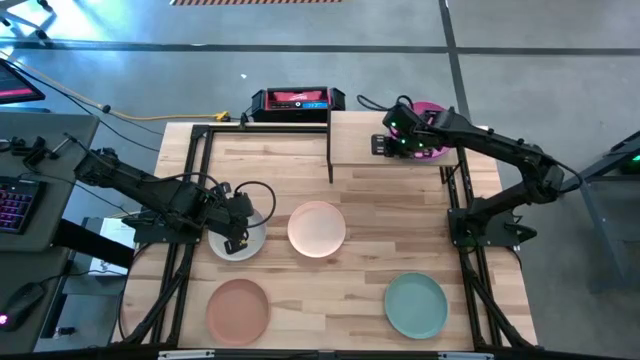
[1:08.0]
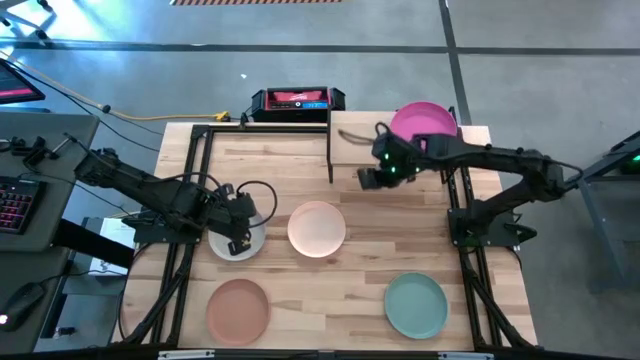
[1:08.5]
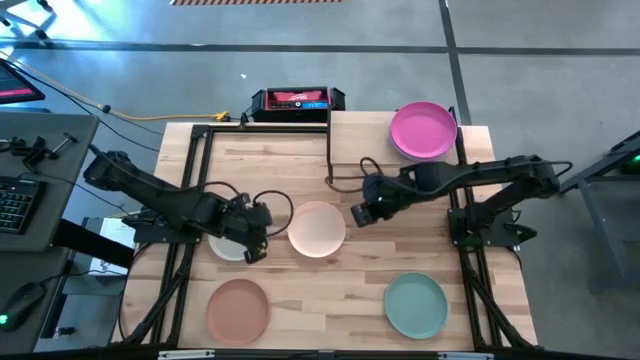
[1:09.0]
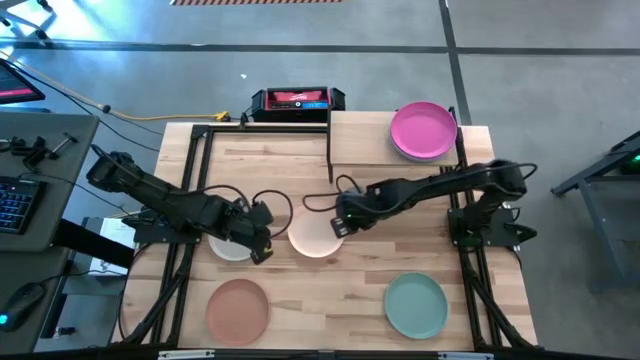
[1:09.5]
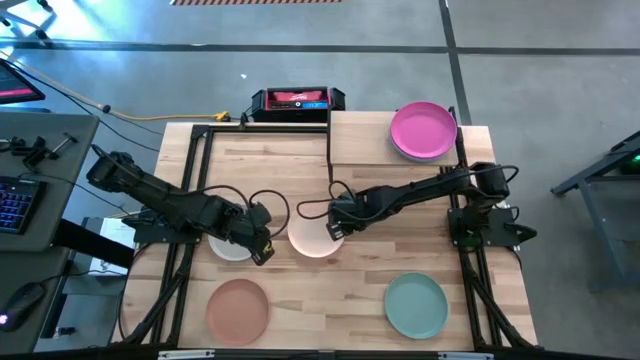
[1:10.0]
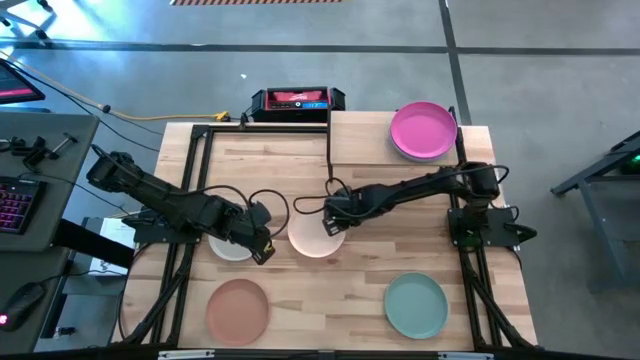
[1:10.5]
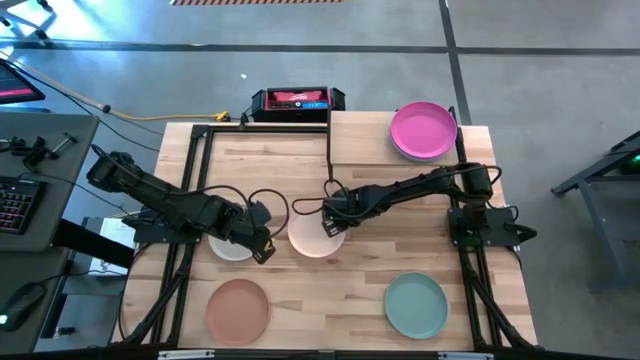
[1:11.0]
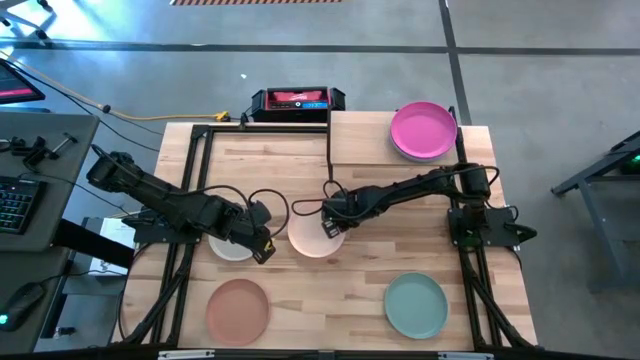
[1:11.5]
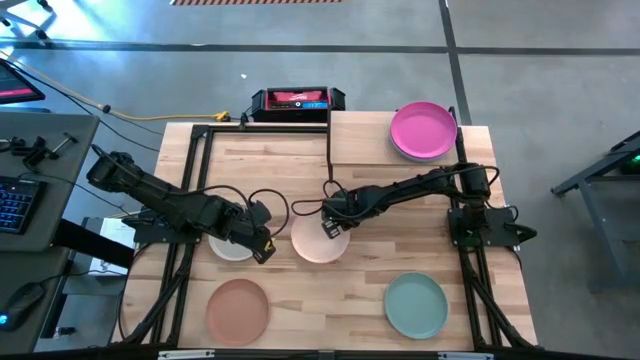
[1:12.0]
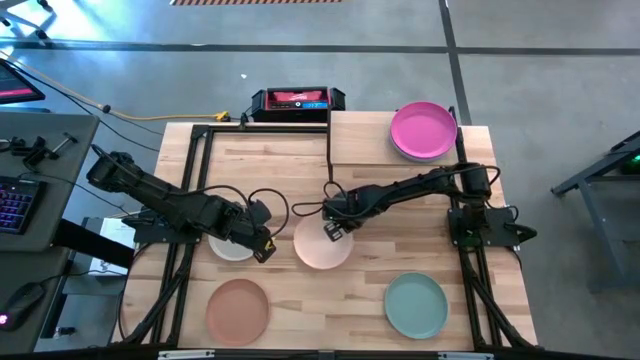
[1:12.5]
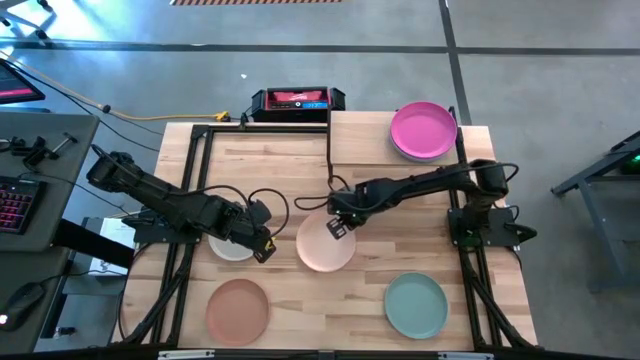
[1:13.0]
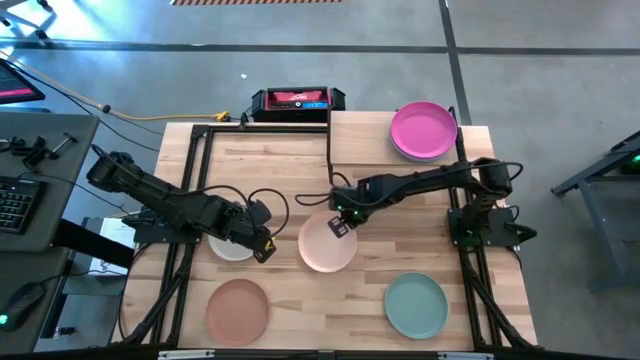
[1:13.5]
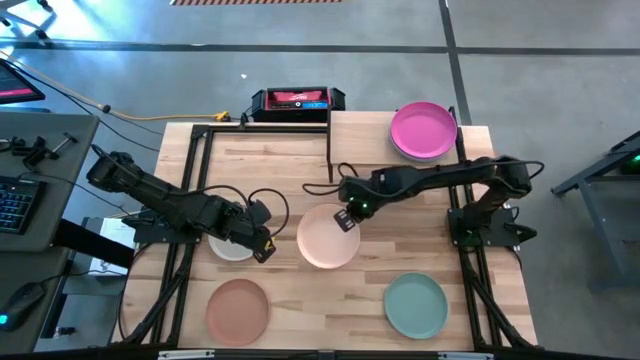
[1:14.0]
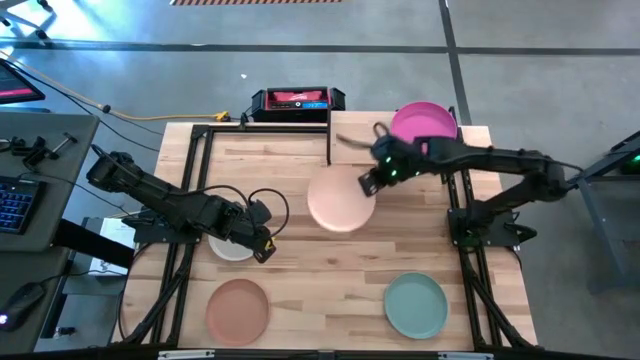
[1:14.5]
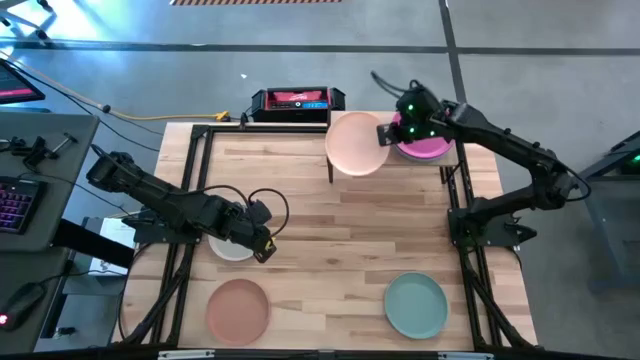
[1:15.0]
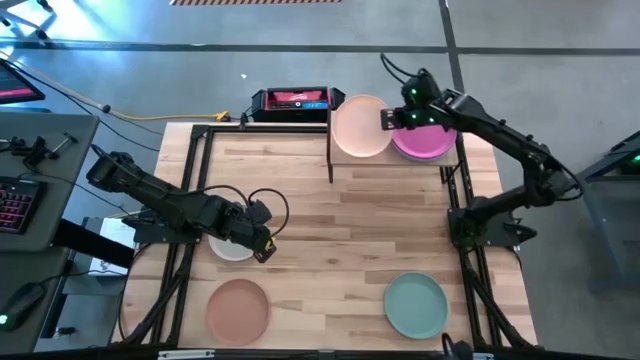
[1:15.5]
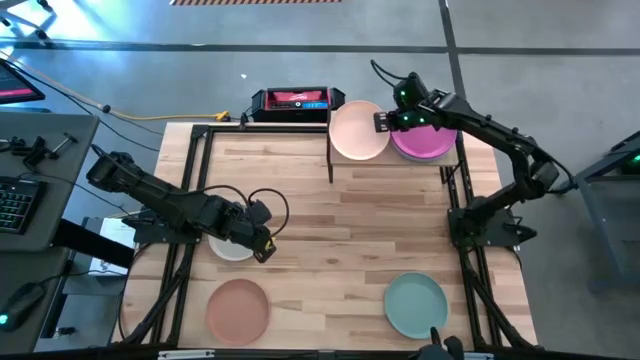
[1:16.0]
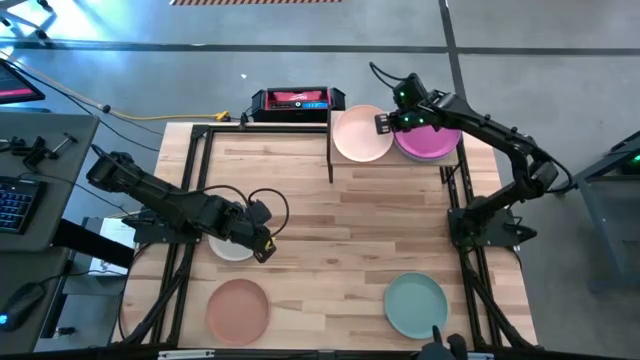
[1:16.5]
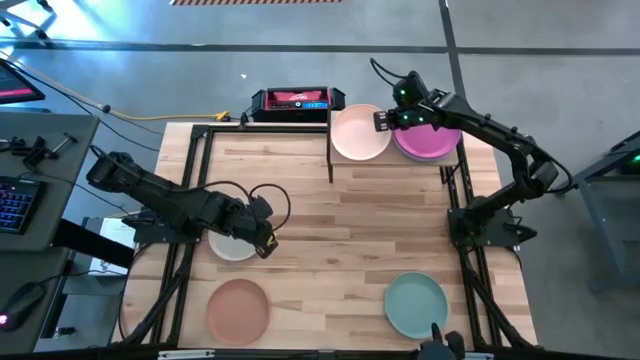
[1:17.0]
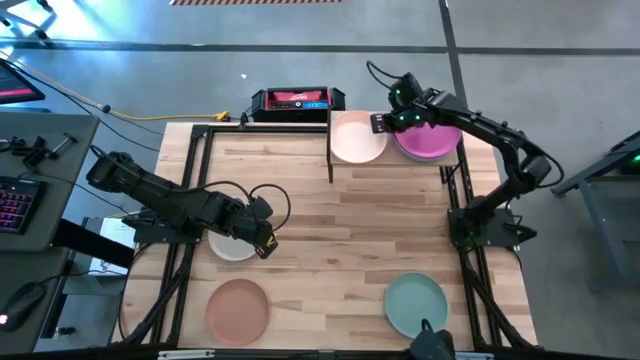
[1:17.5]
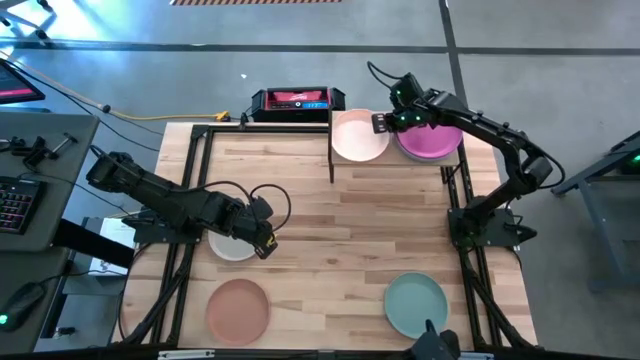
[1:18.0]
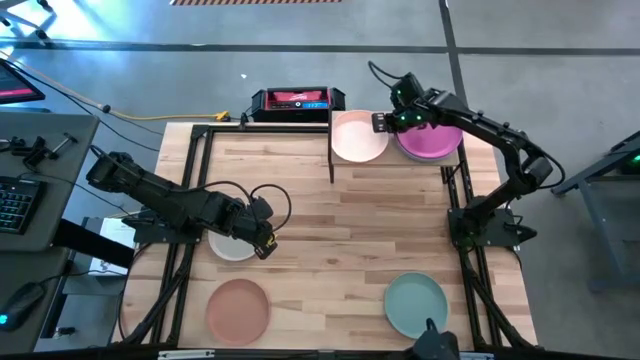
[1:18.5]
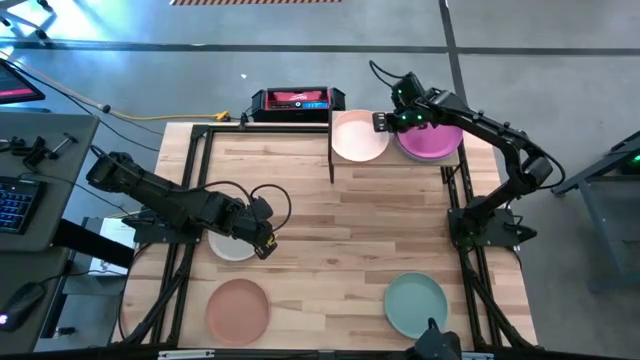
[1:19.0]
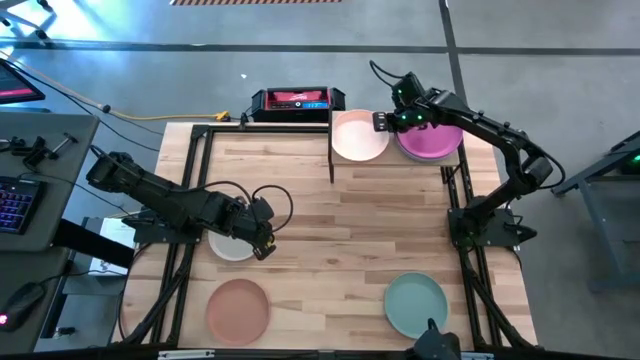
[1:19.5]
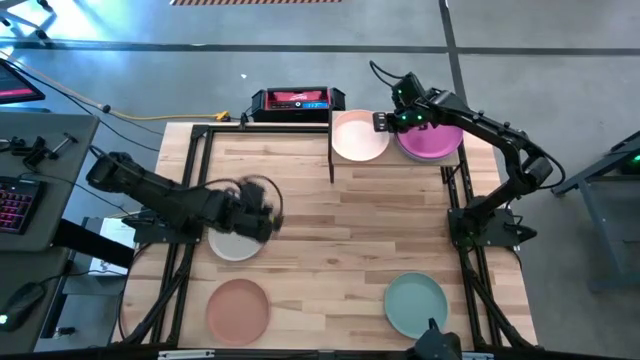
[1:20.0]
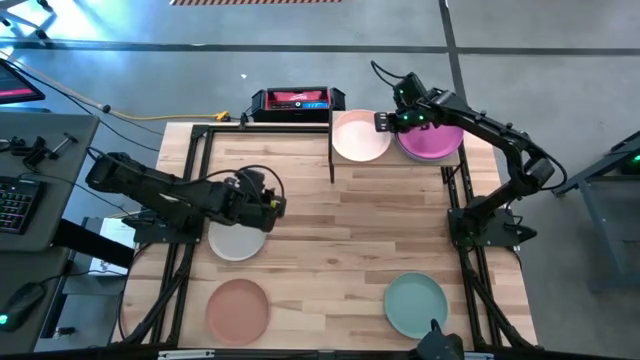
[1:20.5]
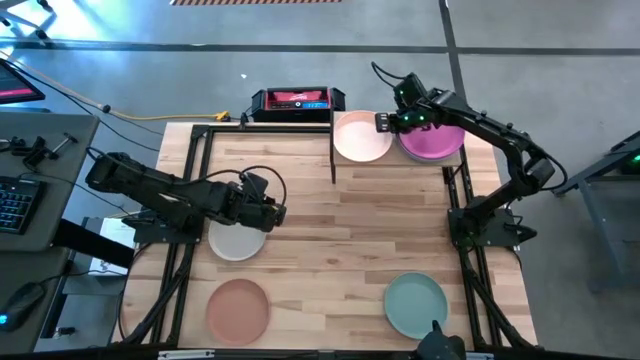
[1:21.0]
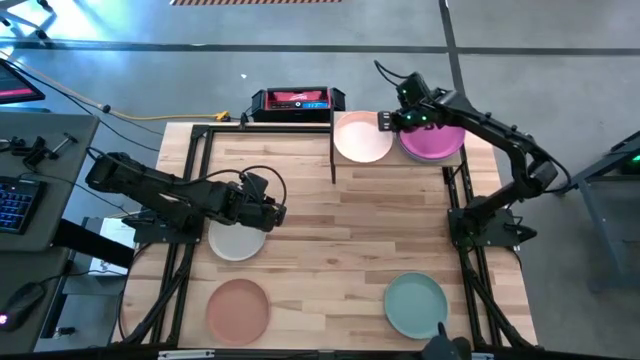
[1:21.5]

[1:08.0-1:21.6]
Task: Place and stack plates onto a shelf
Put the light orange plate on the shelf

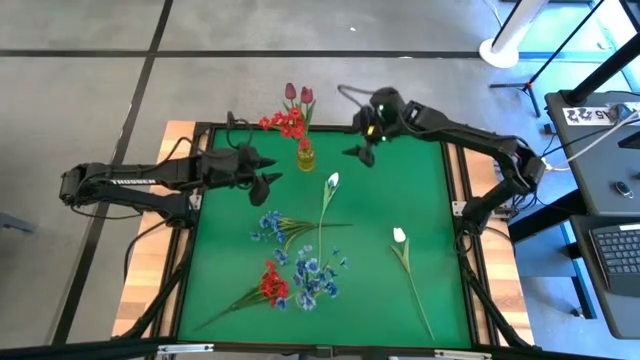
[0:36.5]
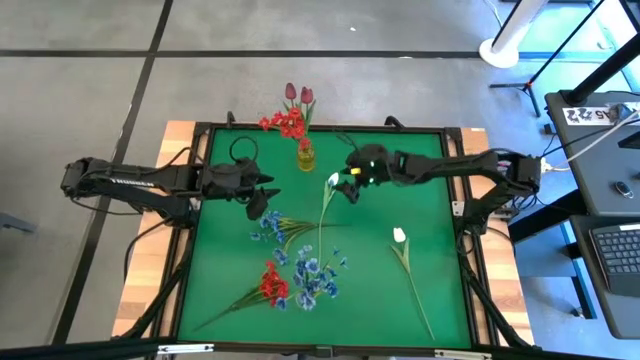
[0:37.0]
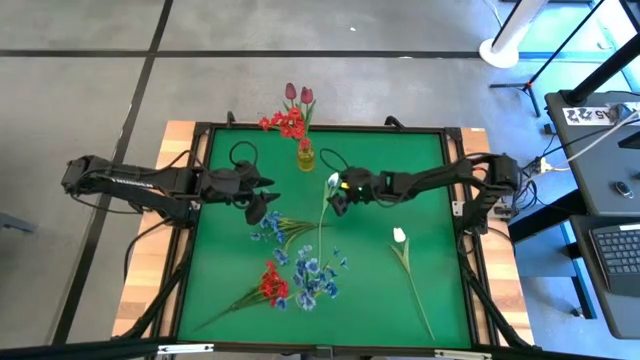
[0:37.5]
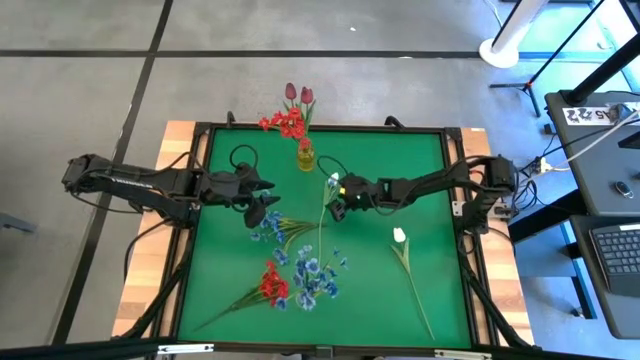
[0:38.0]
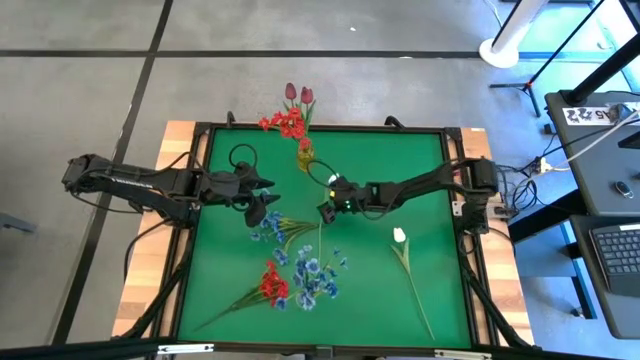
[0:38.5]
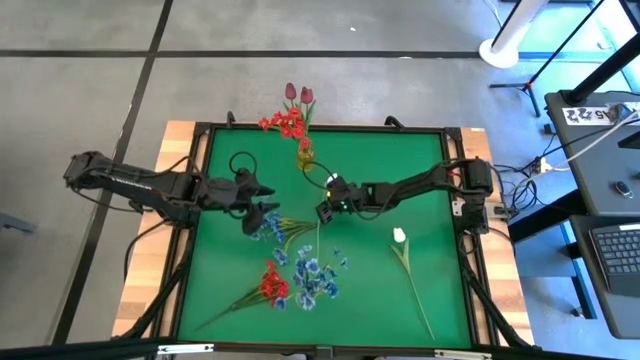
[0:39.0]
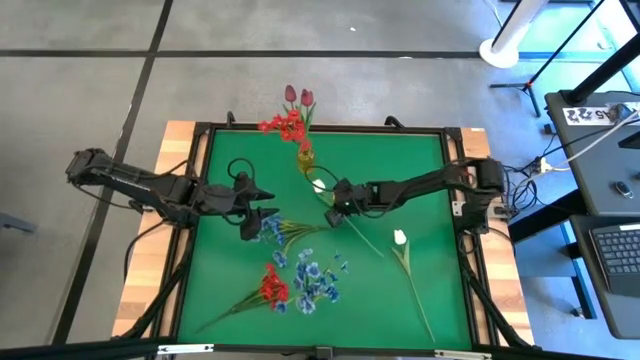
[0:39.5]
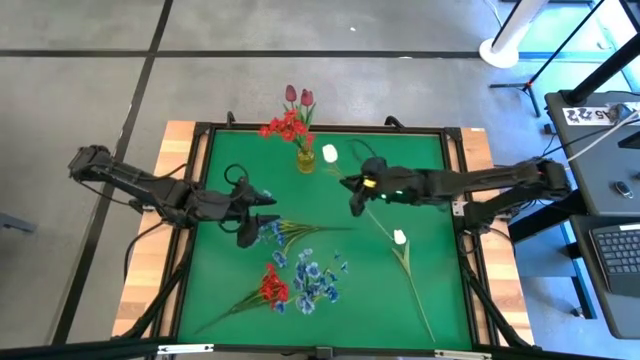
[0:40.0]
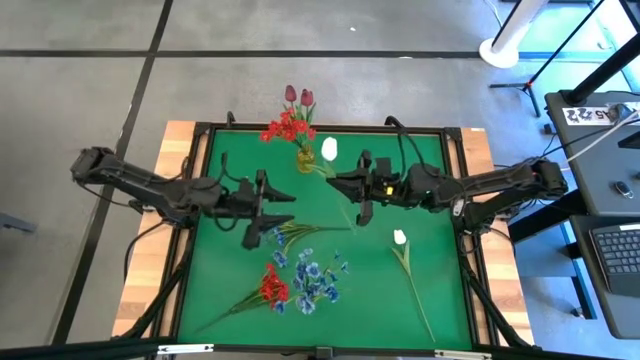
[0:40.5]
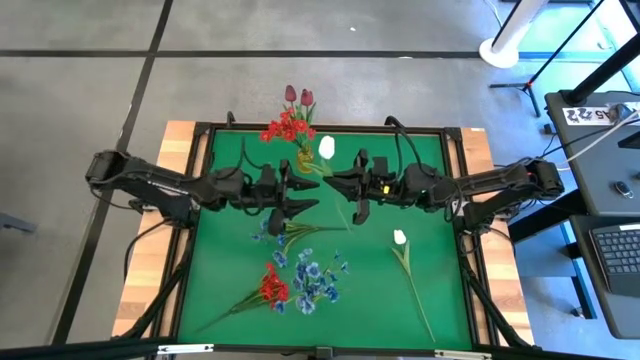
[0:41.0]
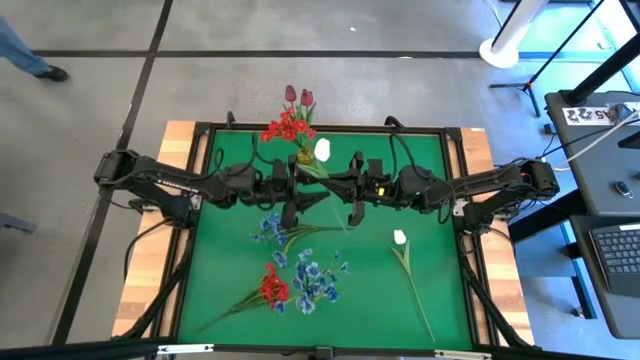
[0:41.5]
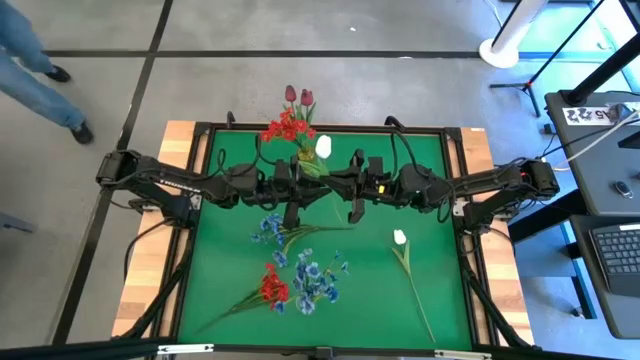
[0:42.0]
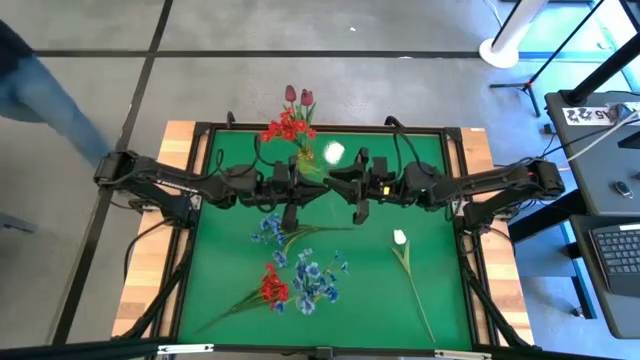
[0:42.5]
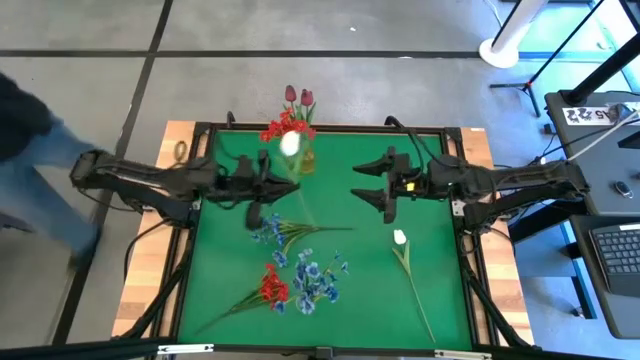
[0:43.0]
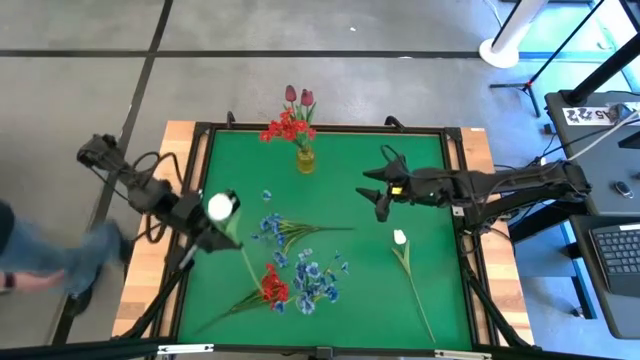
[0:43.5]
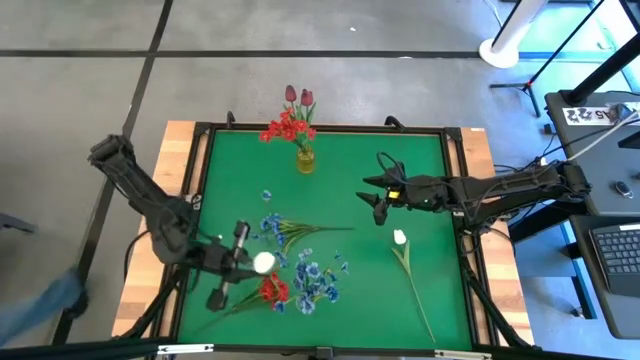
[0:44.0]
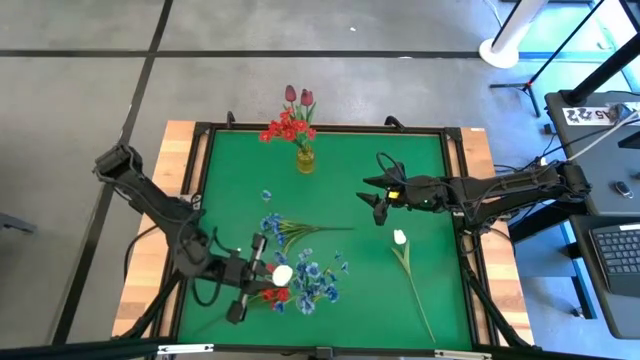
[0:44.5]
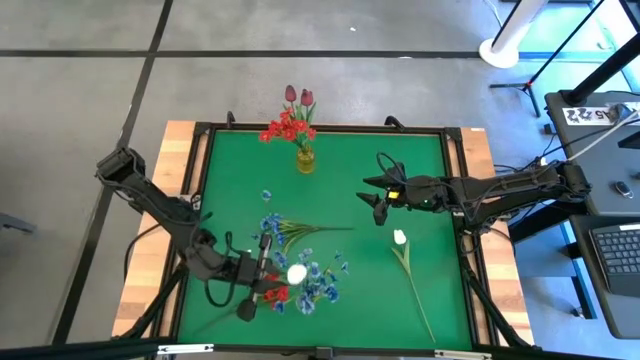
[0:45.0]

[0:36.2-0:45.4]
Task: Sort flowers into vase by color
Put the top white tulip into the transparent vase
